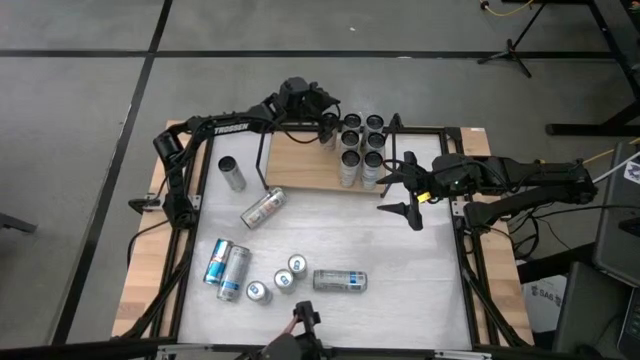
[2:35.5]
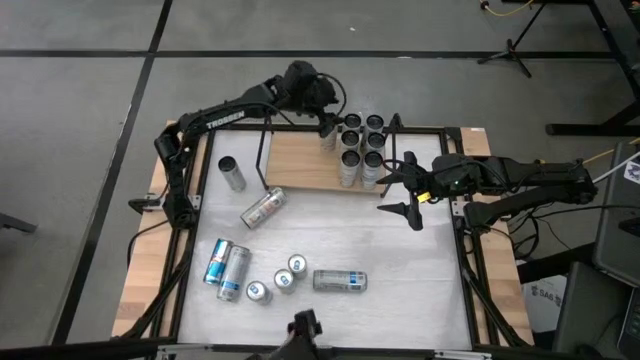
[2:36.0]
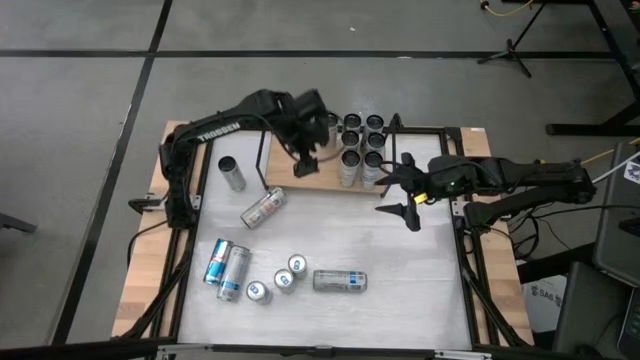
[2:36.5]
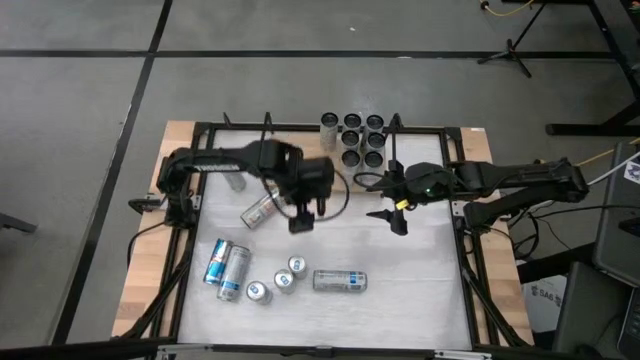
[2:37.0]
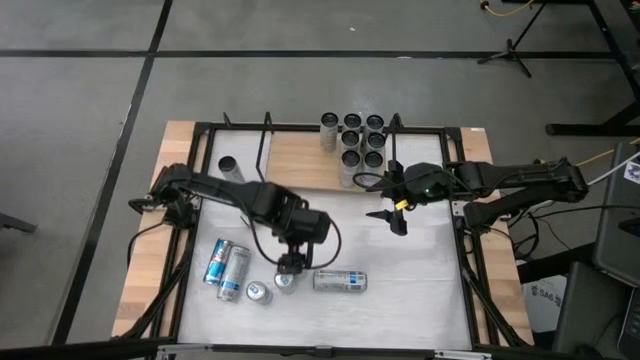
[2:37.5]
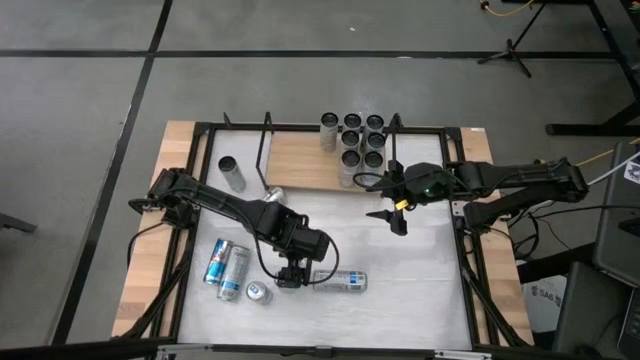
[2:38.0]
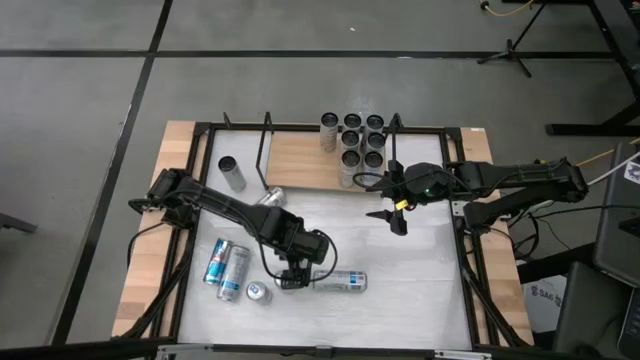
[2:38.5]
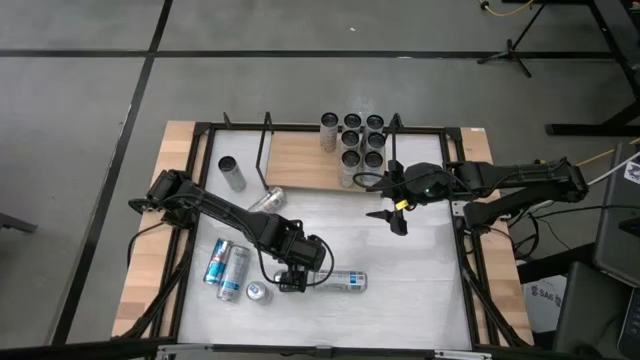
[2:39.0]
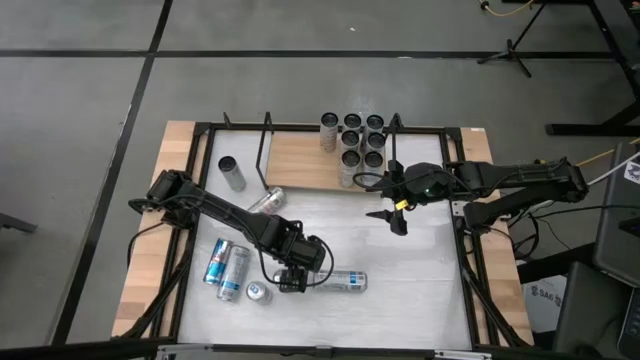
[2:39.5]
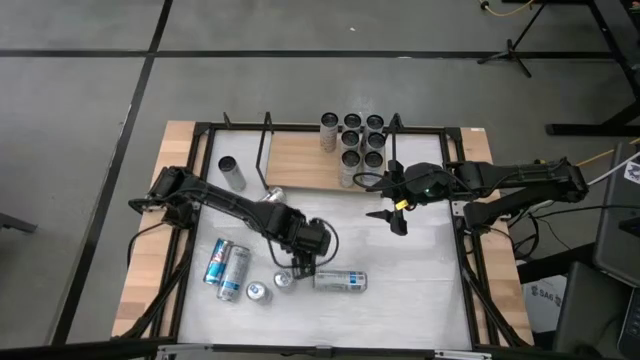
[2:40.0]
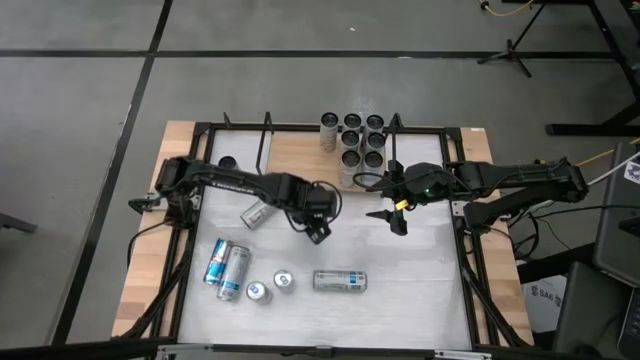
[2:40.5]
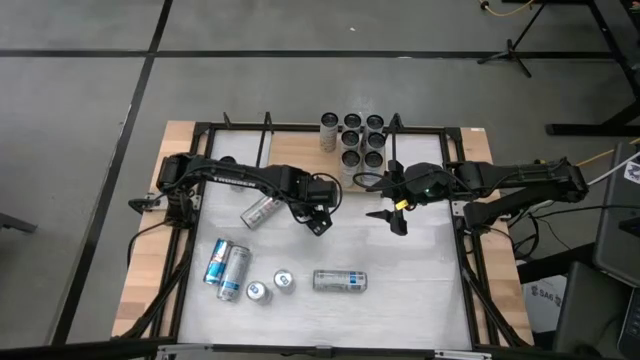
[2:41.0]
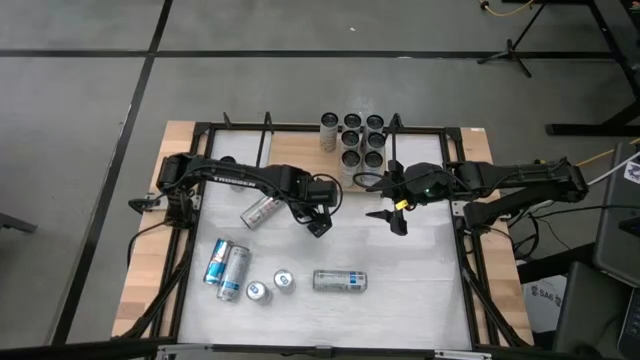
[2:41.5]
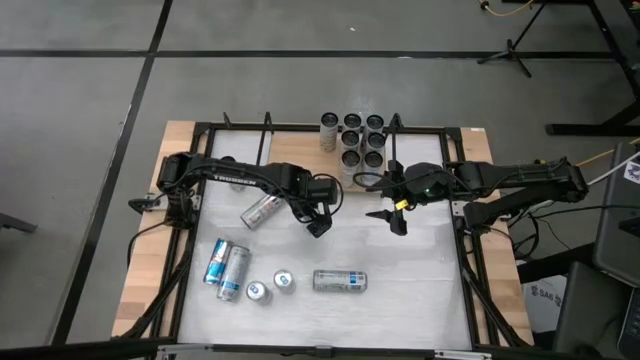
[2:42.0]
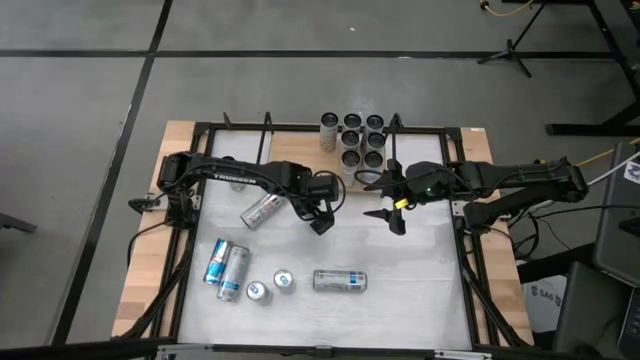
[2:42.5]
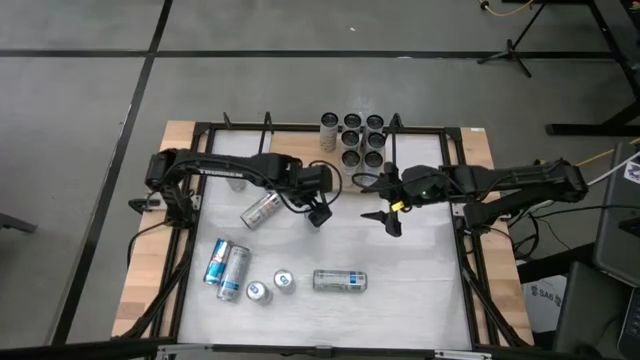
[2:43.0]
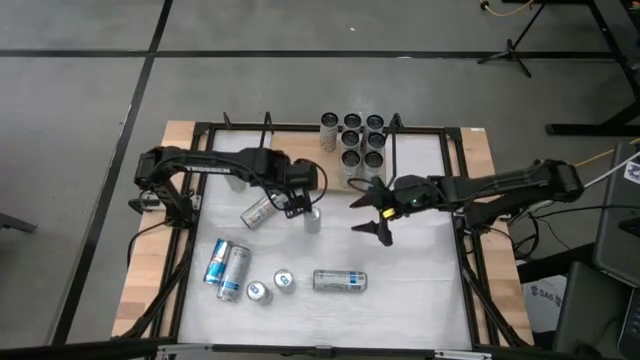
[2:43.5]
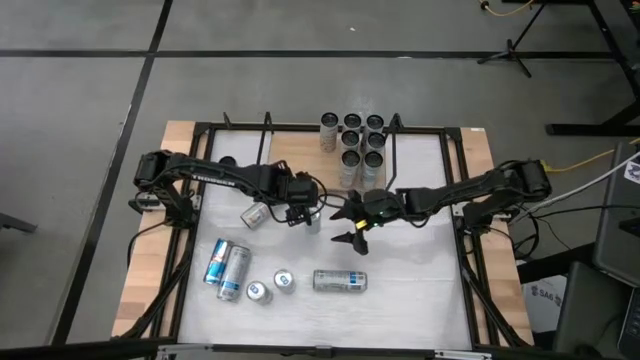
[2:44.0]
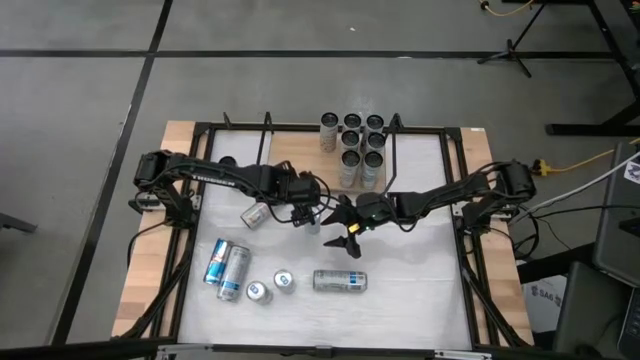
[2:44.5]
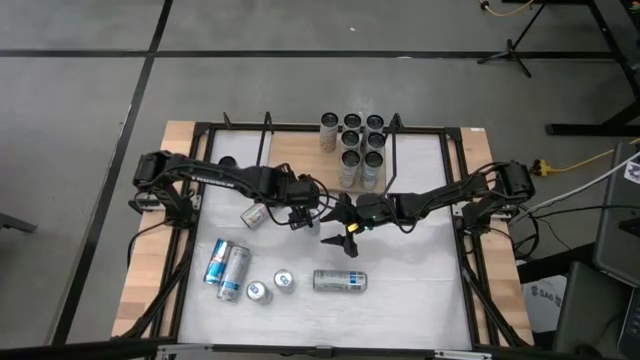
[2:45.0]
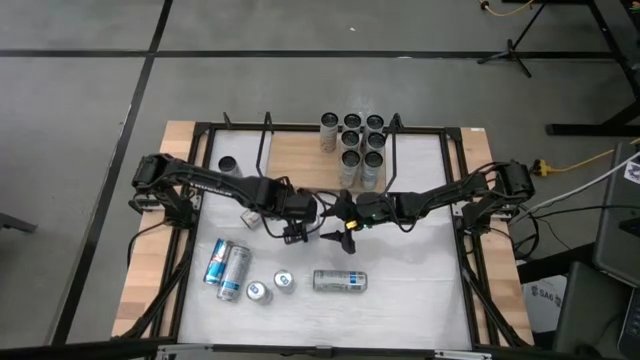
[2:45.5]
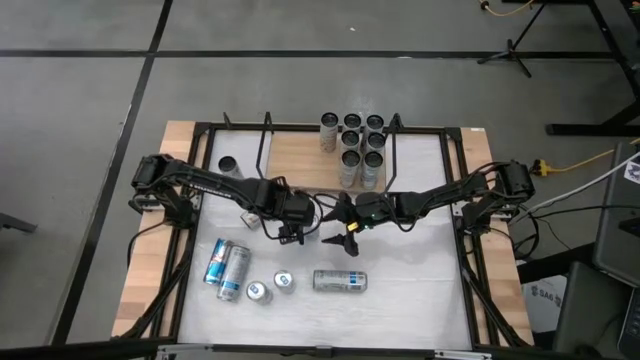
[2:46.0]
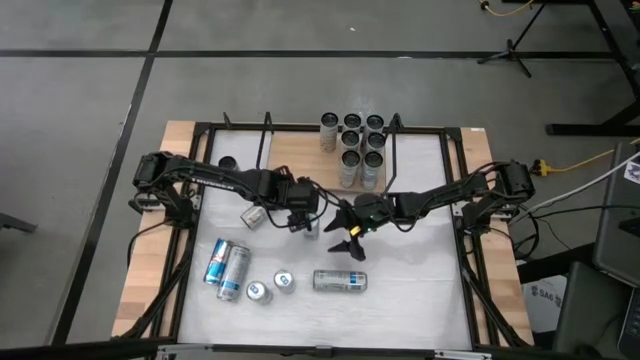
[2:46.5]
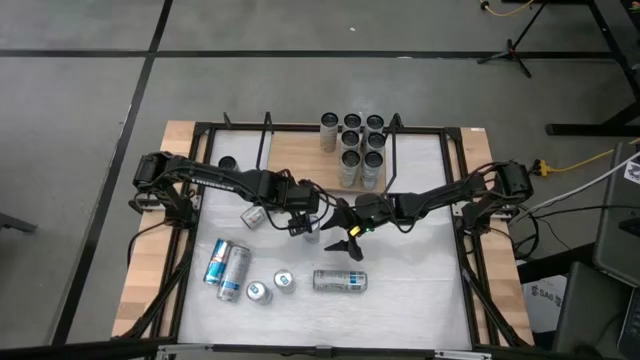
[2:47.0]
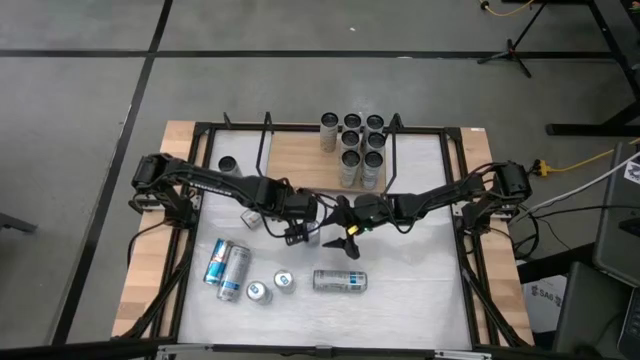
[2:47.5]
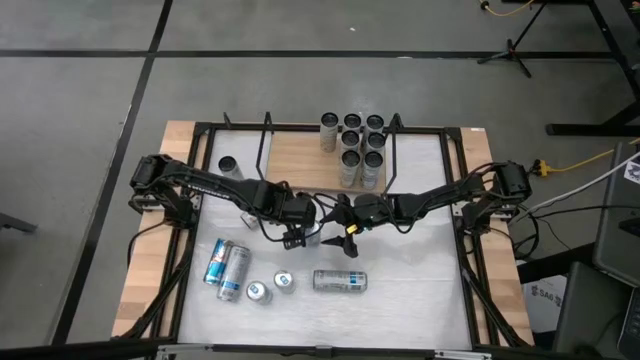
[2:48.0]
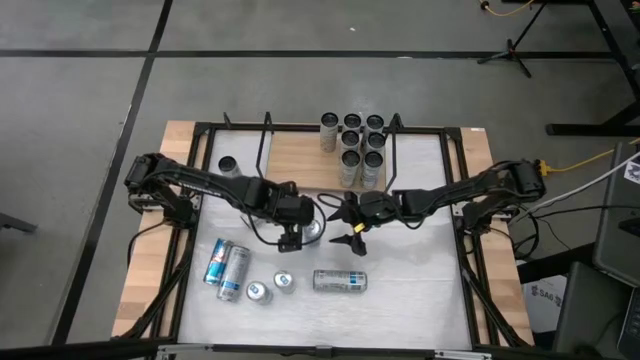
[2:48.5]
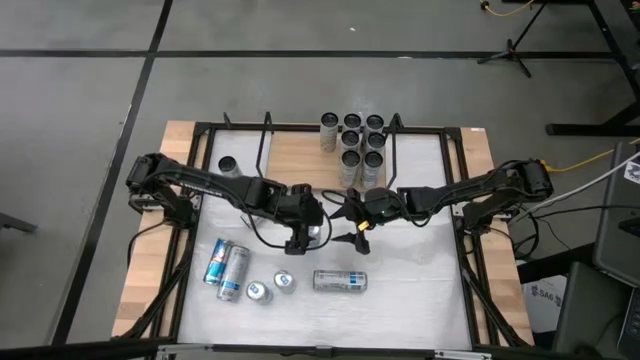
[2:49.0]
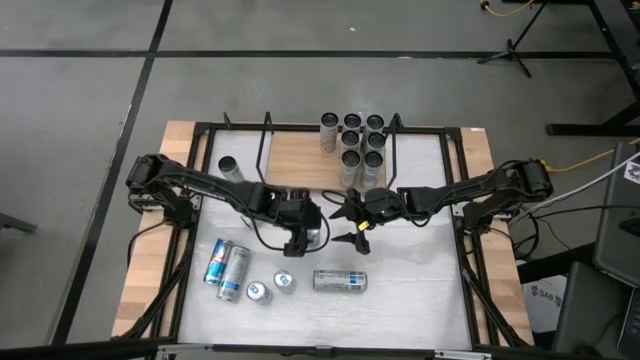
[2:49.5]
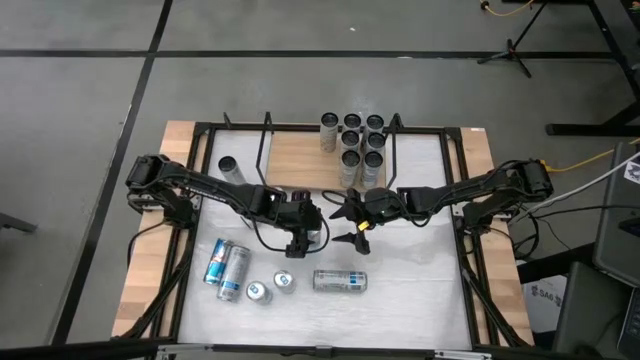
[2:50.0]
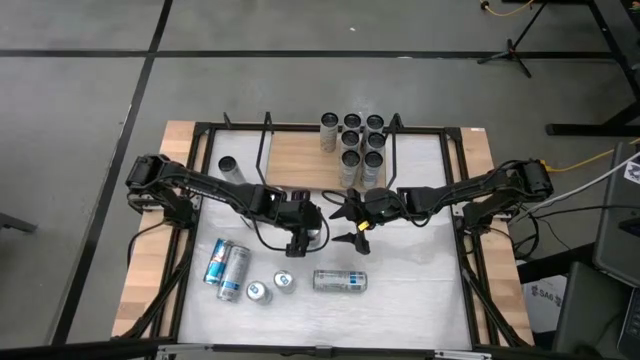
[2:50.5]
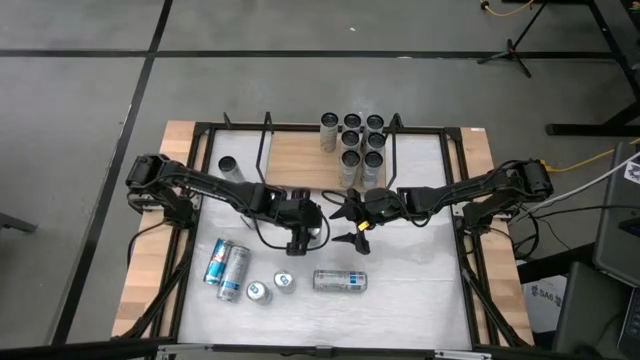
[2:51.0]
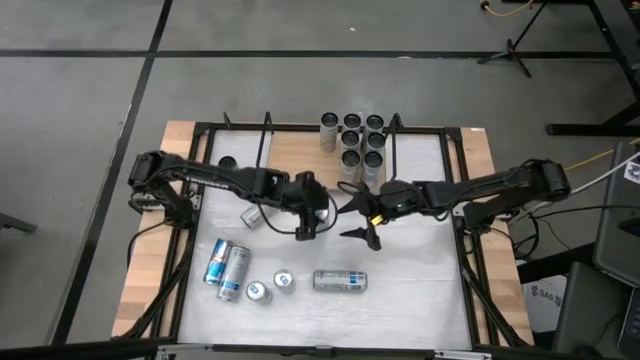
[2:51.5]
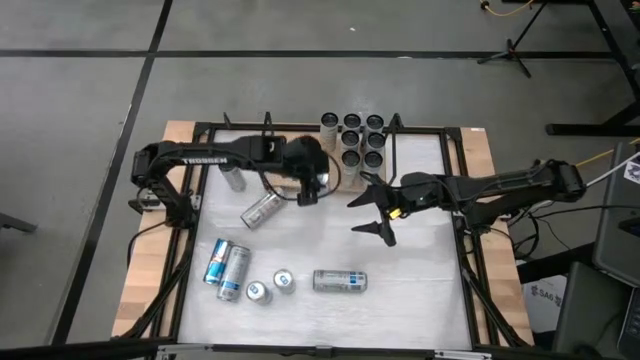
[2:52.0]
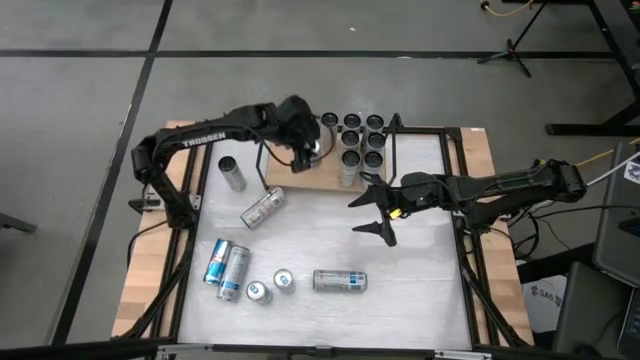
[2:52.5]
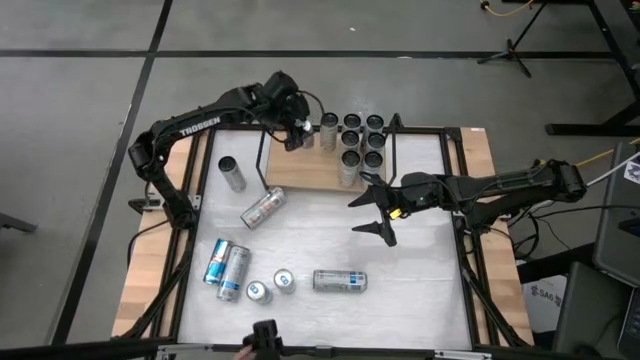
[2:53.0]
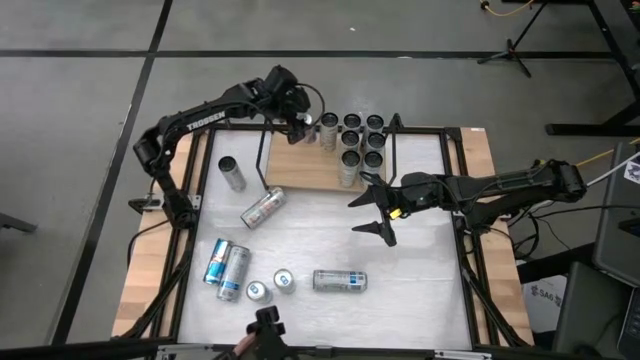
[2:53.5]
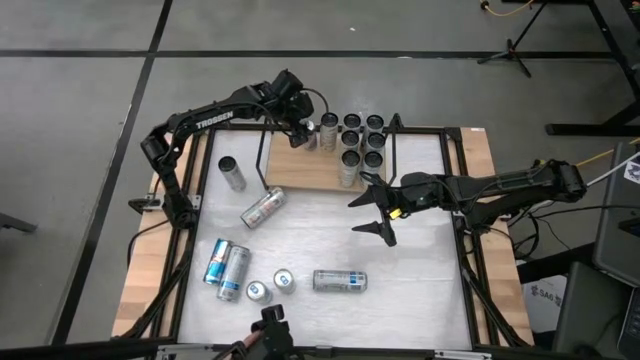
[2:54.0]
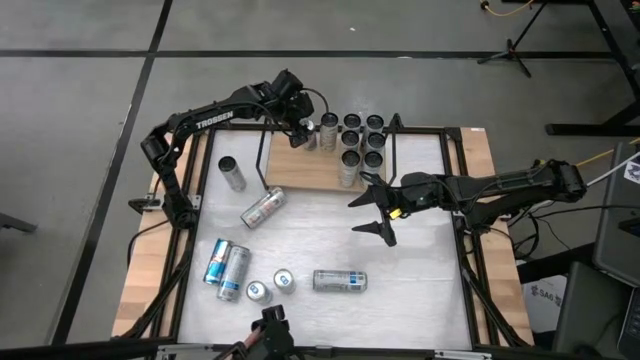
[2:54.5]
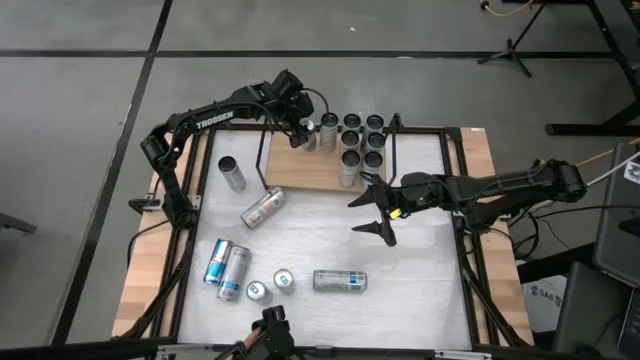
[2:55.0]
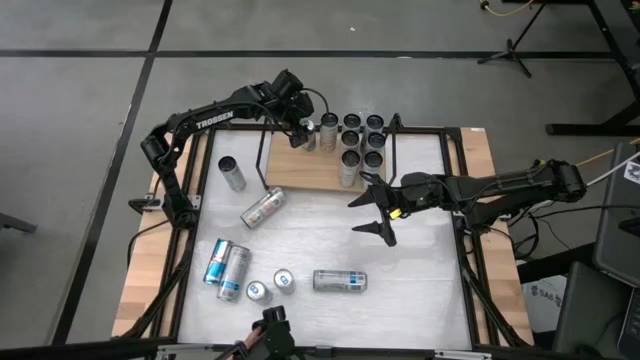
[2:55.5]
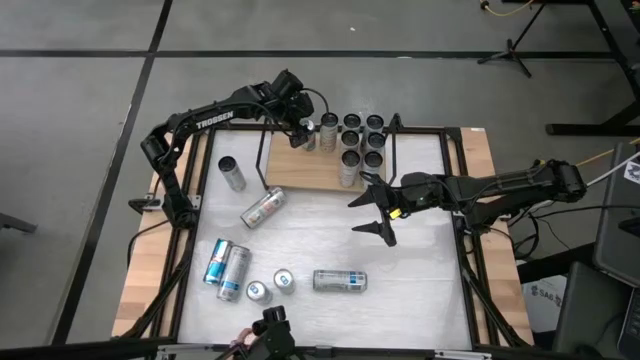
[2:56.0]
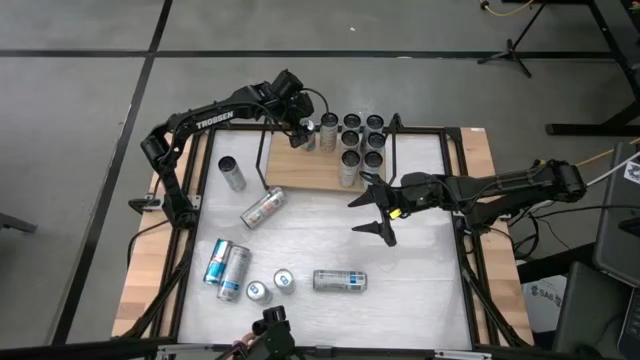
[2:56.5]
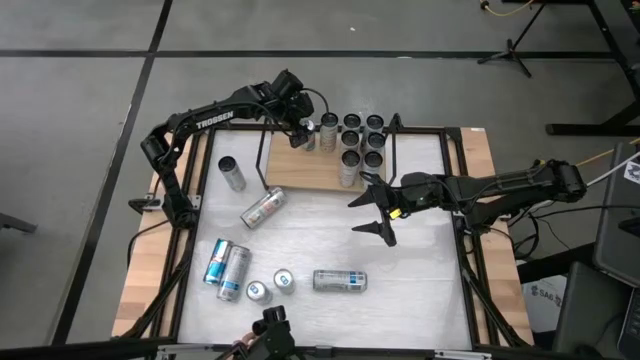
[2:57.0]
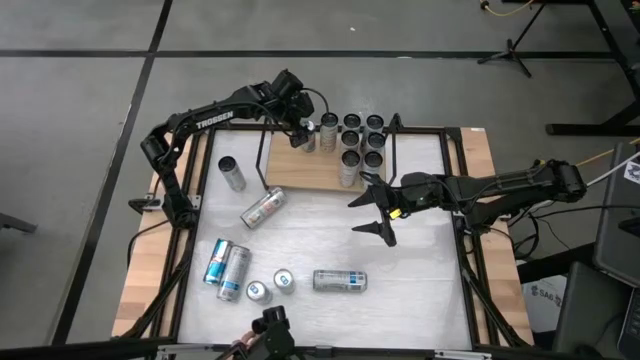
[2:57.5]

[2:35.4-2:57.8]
Task: Place canned beverage on shelf
Put the blue soda can on the shelf
